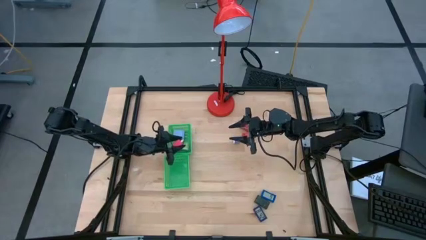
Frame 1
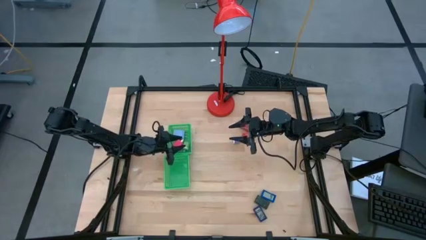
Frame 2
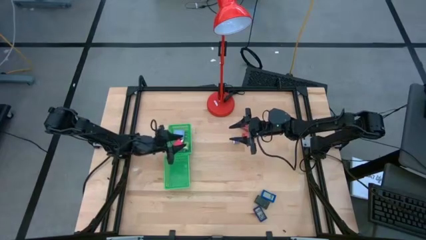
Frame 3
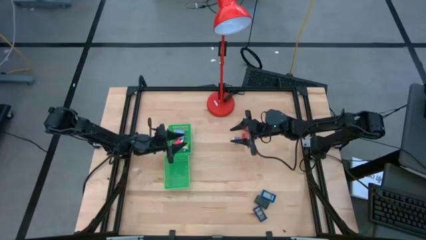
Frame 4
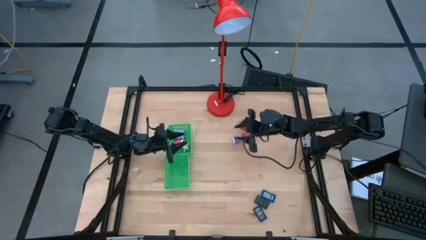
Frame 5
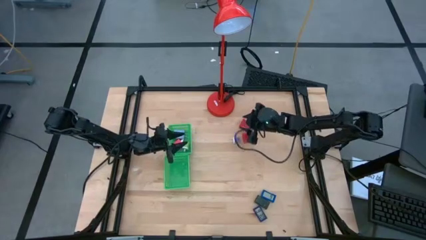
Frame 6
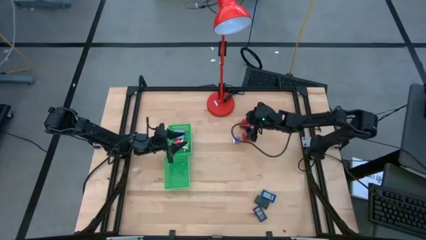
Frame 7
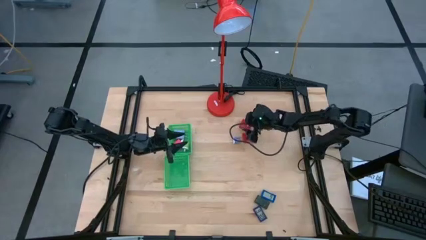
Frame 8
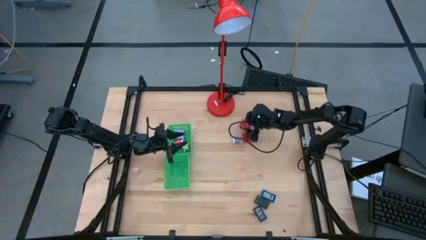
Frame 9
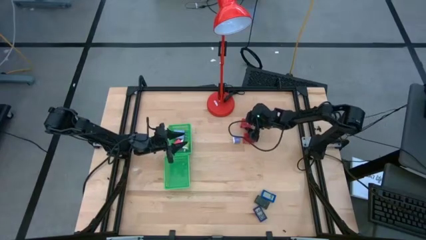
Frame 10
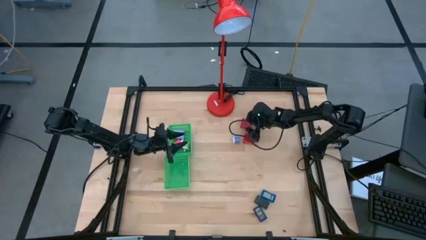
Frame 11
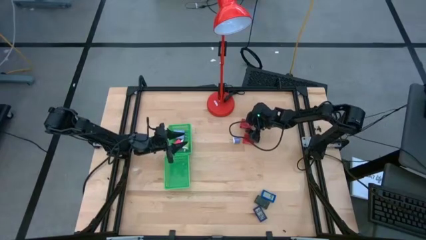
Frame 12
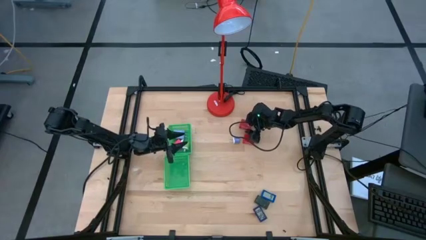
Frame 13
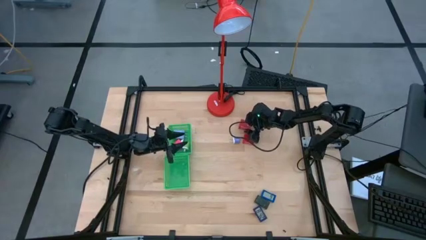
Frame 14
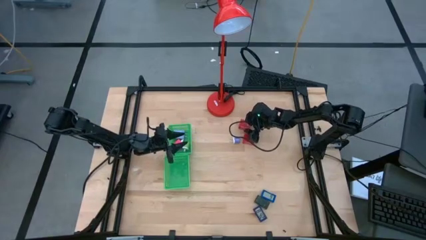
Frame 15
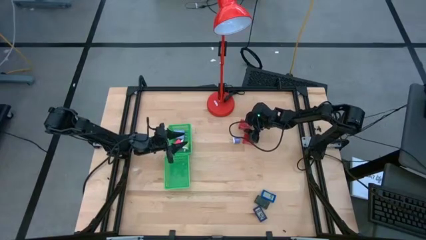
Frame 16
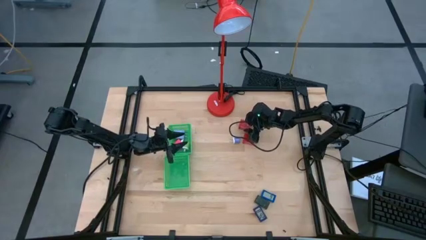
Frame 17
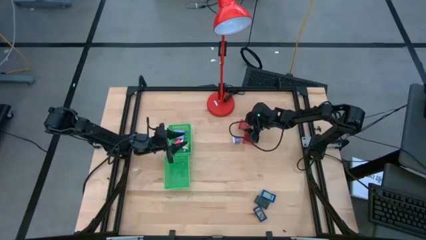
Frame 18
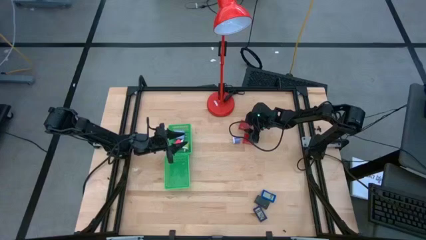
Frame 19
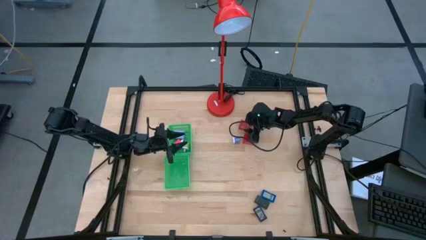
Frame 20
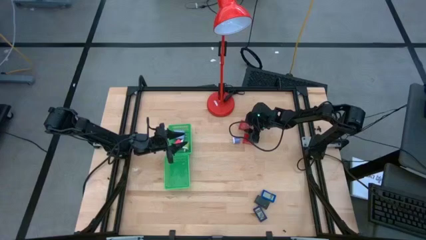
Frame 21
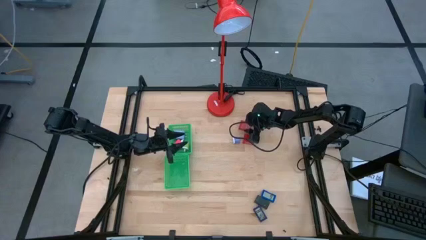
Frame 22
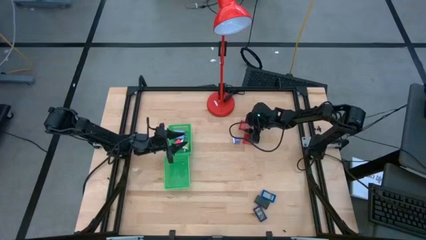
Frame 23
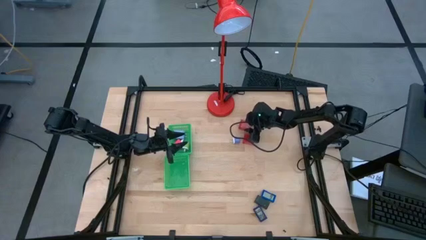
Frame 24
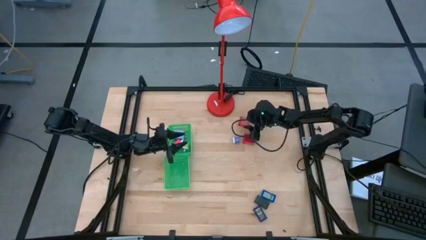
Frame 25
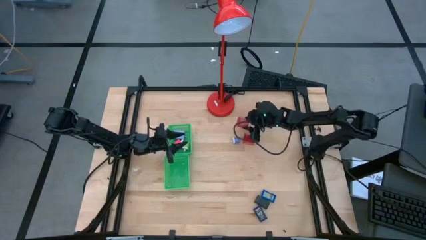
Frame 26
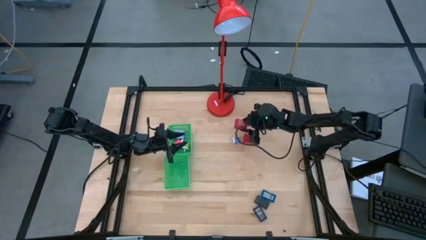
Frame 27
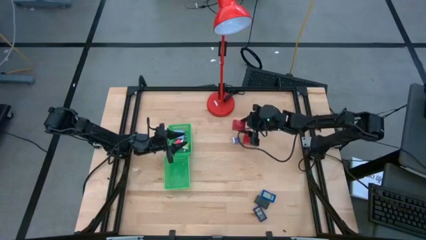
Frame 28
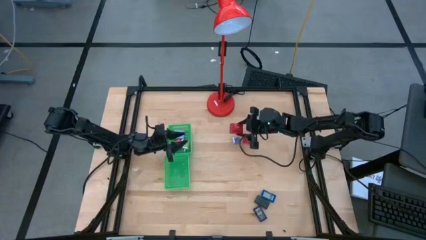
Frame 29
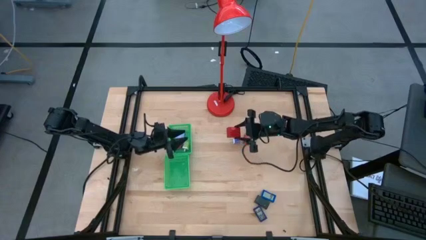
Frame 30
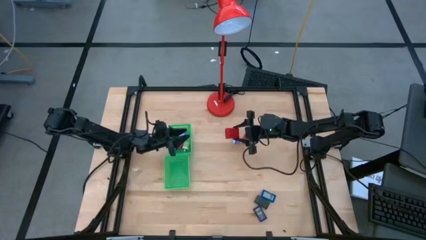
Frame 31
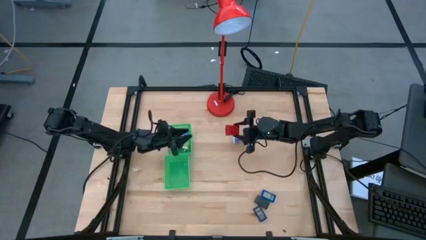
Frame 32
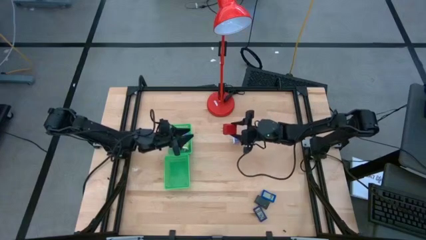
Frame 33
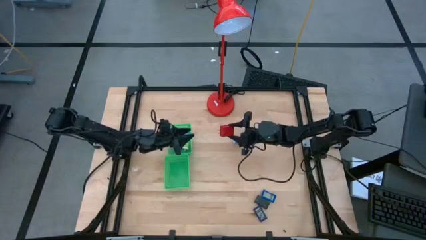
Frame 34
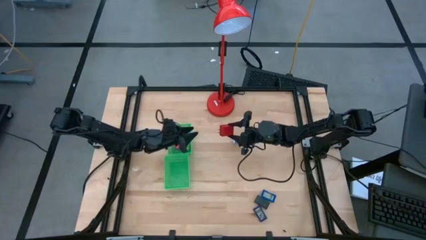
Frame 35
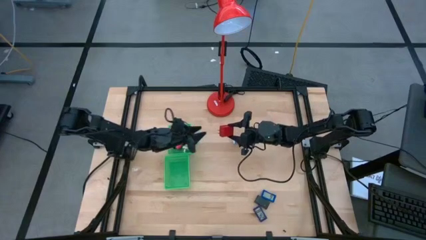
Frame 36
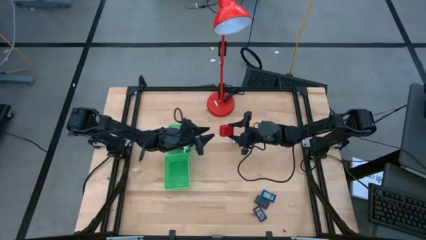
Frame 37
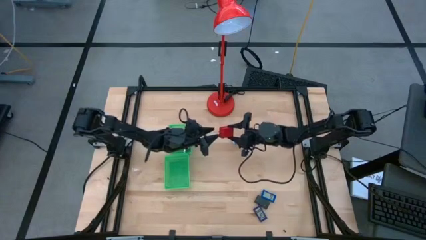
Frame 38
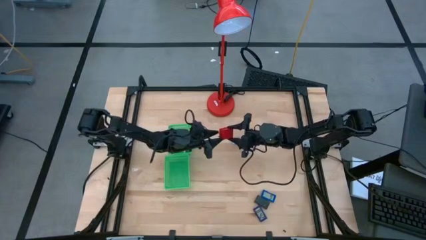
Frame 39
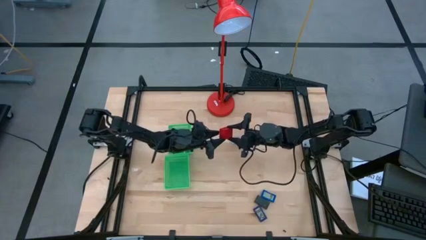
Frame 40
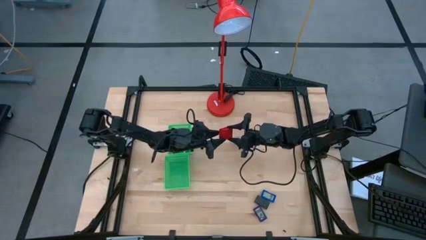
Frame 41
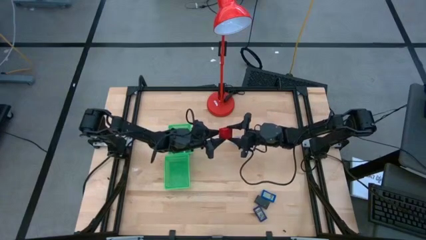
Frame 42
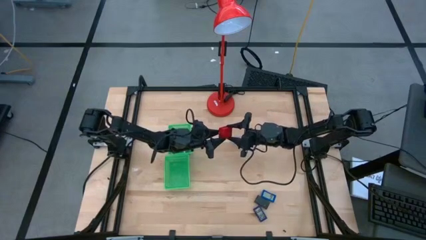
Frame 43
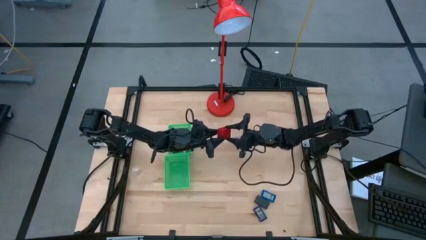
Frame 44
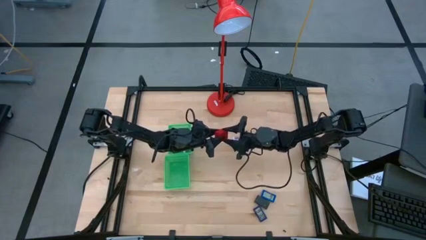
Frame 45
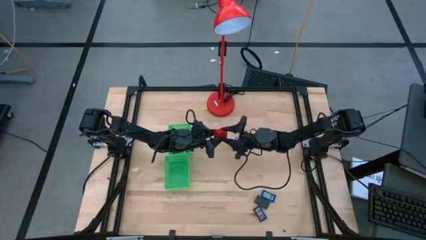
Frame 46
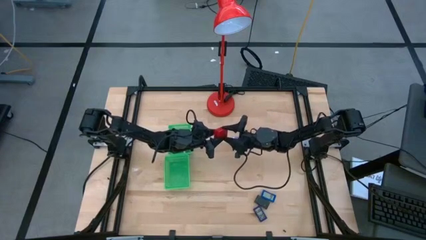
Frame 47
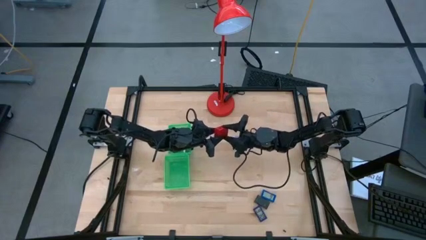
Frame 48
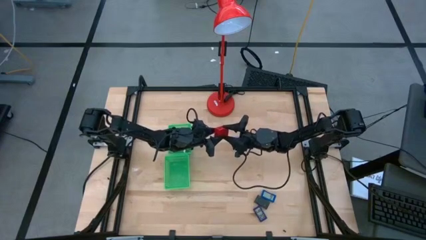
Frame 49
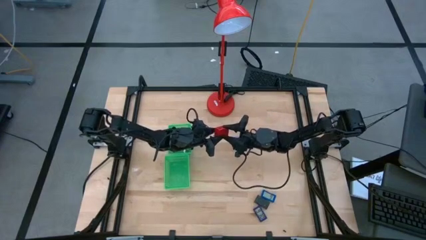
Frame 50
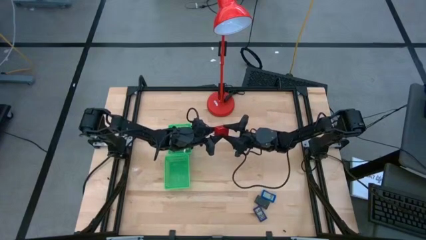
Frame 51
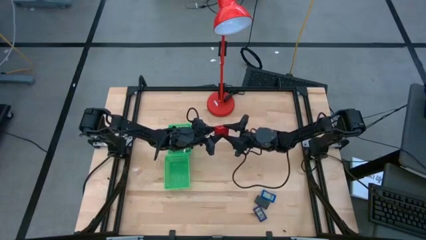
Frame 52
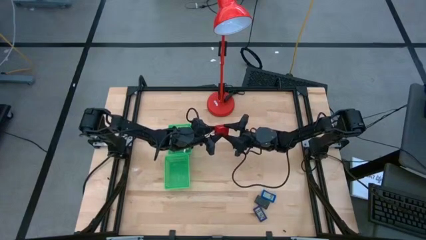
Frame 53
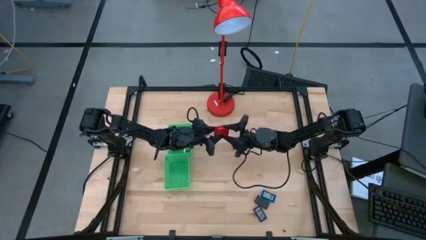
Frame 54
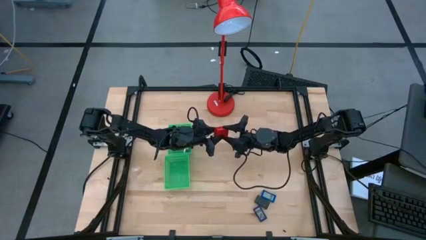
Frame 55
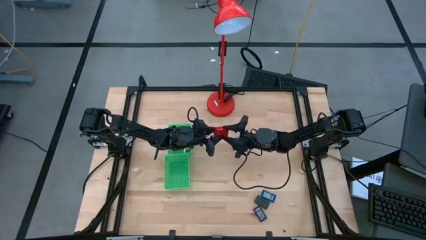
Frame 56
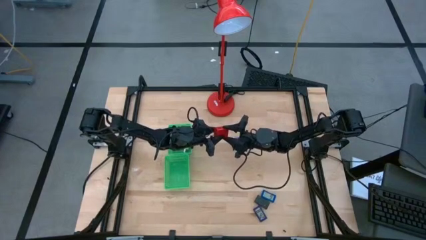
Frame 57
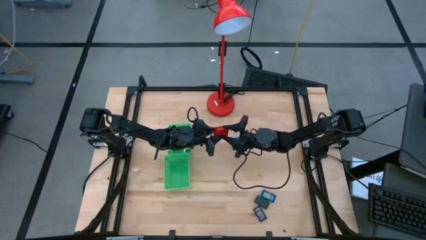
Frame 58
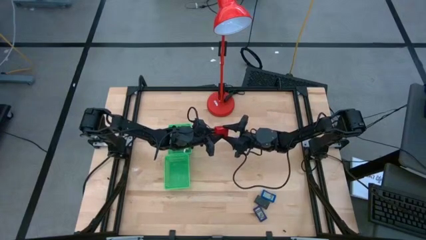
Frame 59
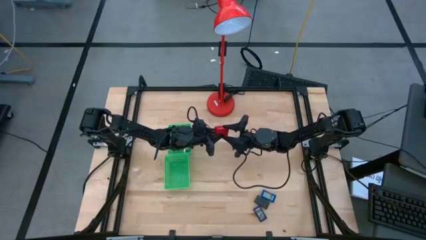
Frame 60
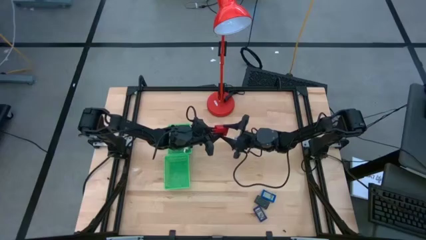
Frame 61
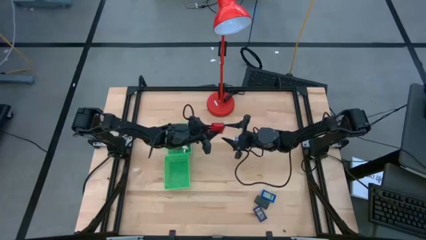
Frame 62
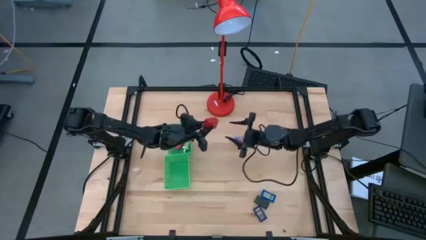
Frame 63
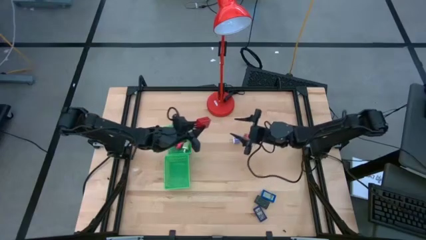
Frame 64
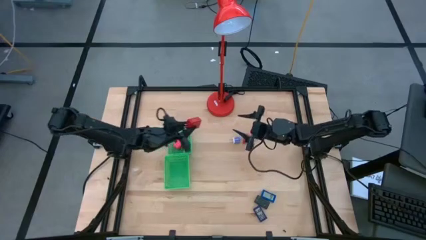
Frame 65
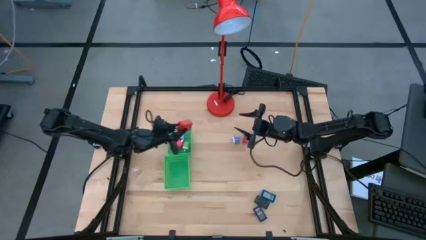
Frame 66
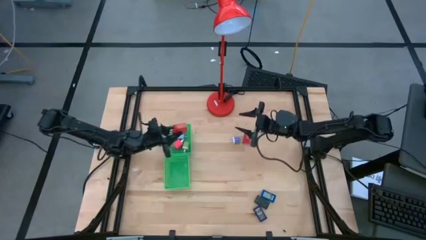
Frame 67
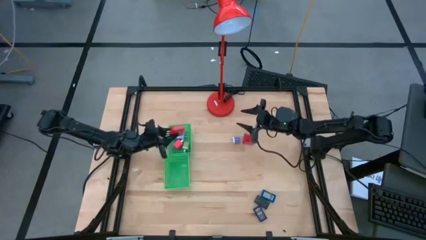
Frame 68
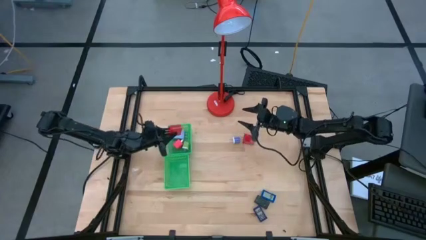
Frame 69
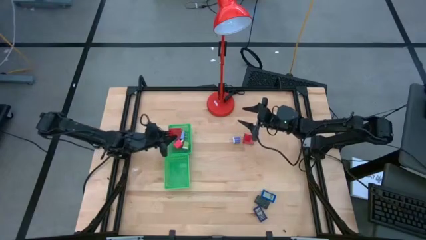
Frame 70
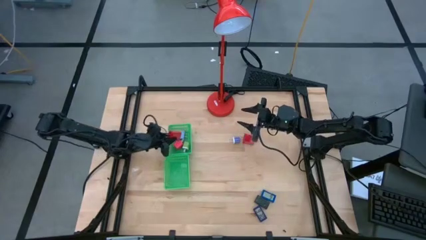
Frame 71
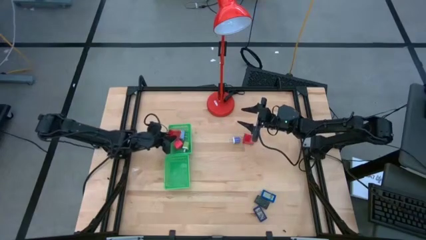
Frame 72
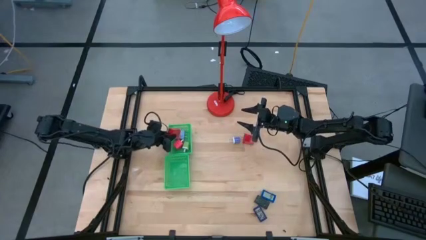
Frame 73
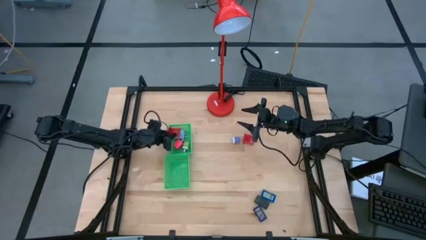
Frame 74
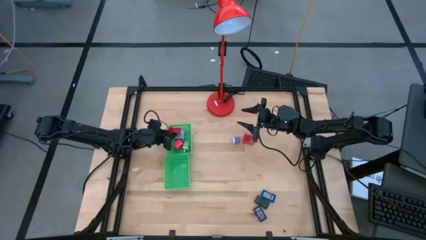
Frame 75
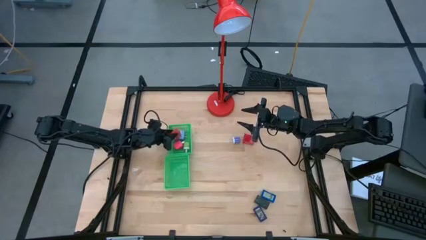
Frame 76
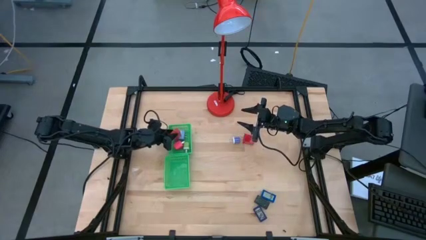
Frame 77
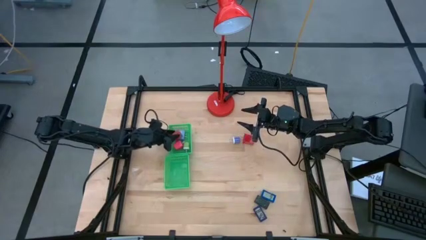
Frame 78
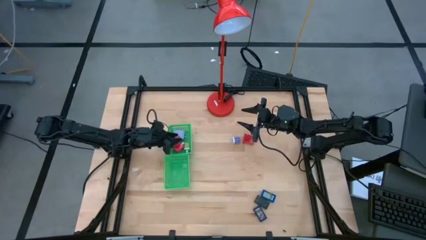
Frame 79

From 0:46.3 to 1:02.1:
Task: Pick & Place Office items
Put the top red charger adapter into the top green bin
